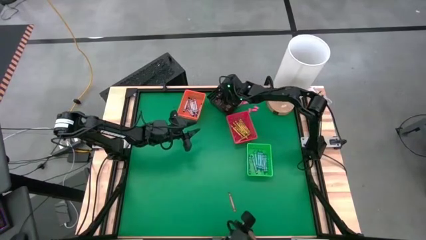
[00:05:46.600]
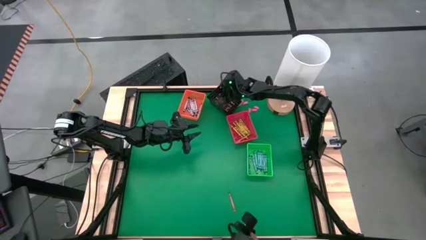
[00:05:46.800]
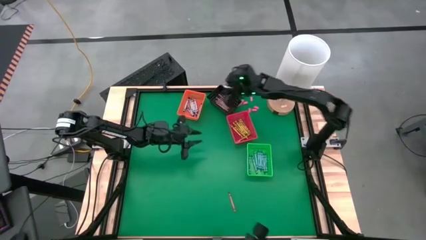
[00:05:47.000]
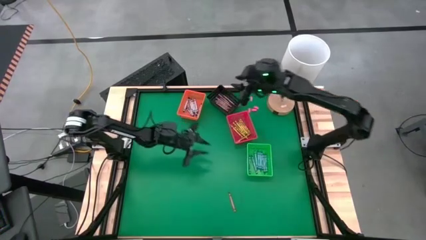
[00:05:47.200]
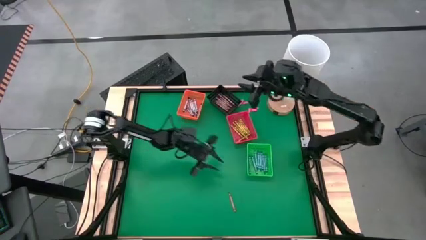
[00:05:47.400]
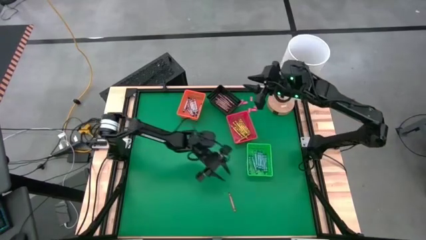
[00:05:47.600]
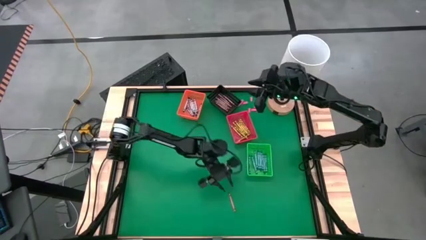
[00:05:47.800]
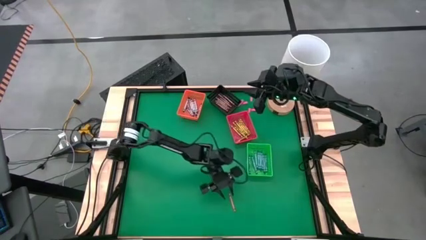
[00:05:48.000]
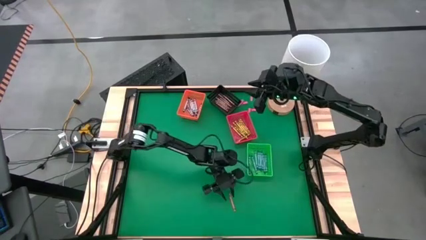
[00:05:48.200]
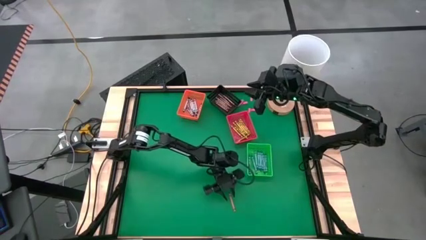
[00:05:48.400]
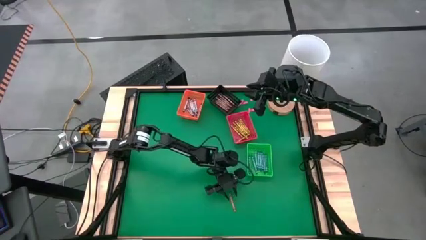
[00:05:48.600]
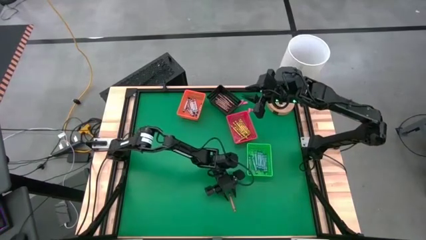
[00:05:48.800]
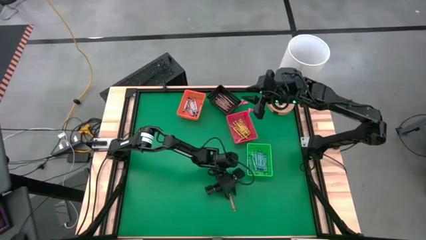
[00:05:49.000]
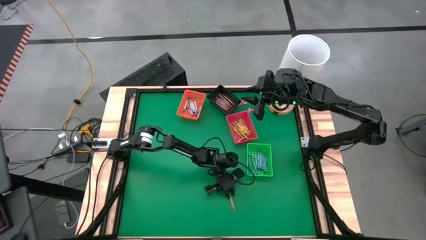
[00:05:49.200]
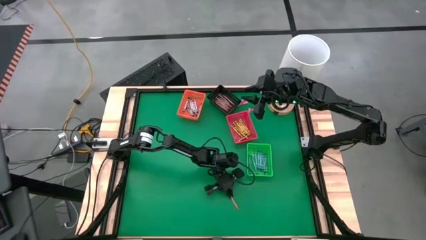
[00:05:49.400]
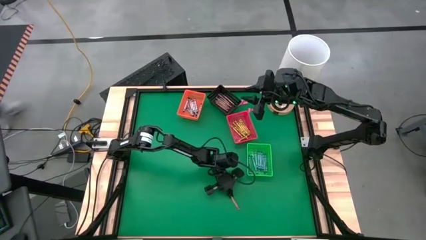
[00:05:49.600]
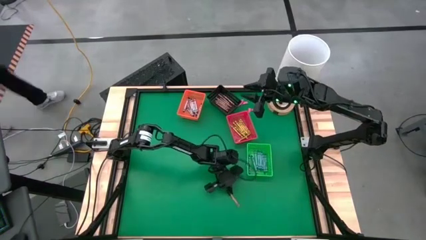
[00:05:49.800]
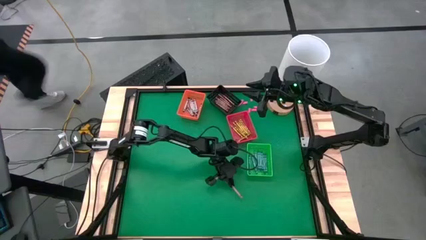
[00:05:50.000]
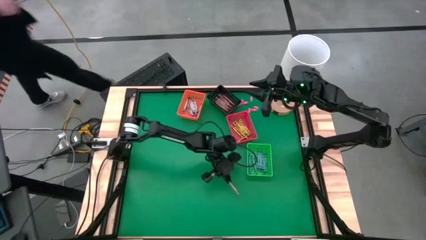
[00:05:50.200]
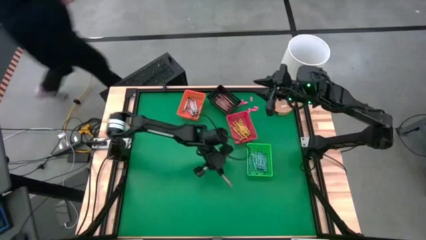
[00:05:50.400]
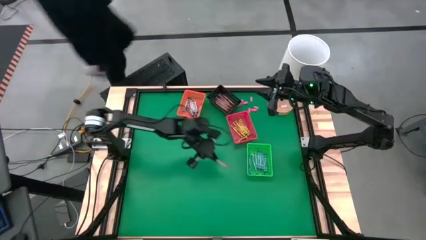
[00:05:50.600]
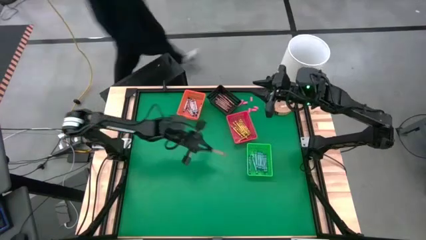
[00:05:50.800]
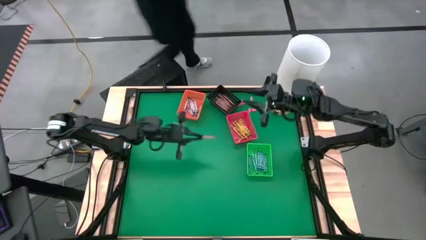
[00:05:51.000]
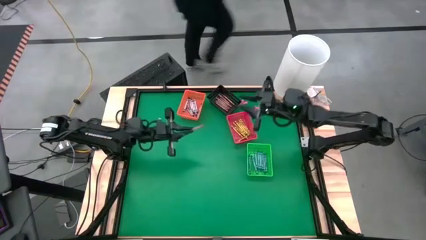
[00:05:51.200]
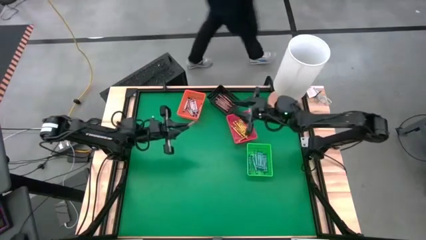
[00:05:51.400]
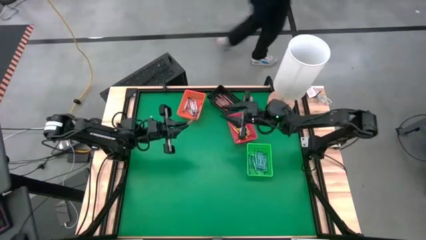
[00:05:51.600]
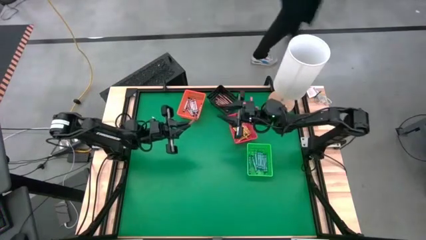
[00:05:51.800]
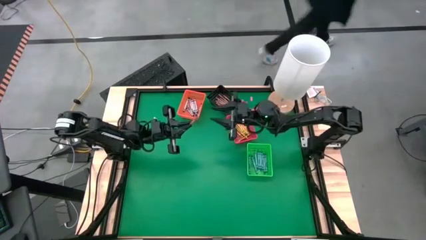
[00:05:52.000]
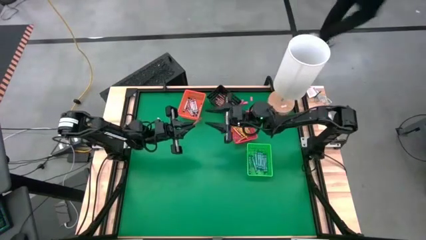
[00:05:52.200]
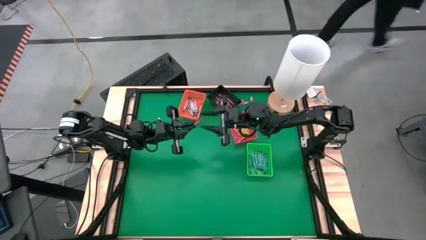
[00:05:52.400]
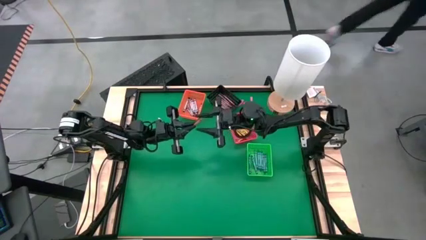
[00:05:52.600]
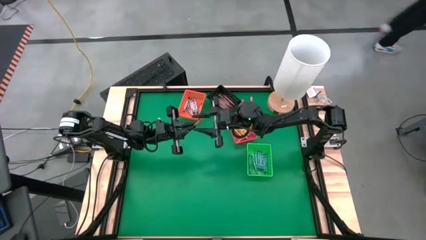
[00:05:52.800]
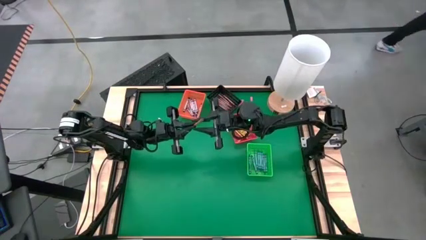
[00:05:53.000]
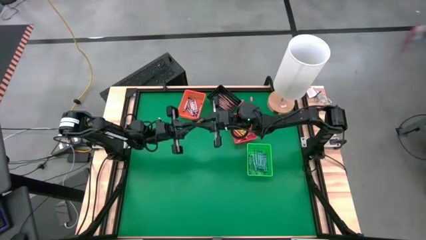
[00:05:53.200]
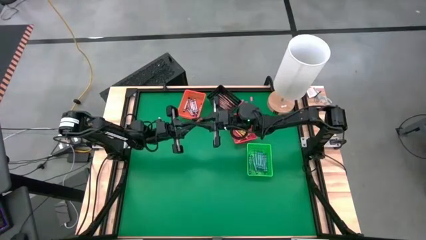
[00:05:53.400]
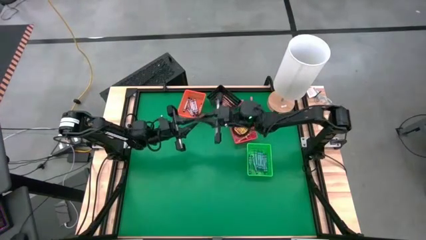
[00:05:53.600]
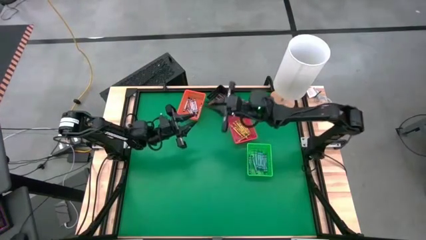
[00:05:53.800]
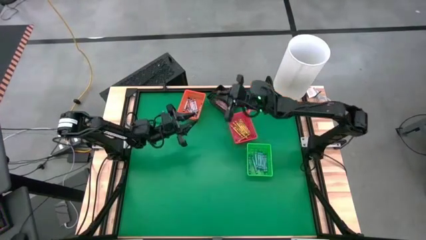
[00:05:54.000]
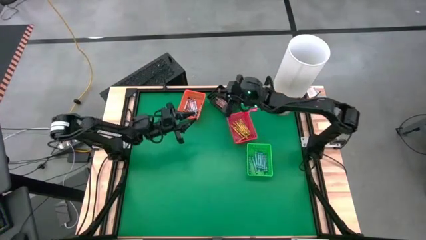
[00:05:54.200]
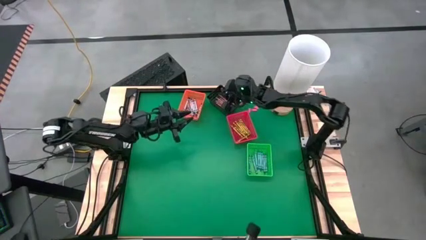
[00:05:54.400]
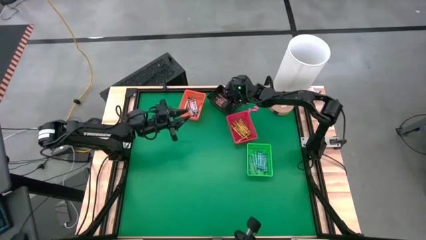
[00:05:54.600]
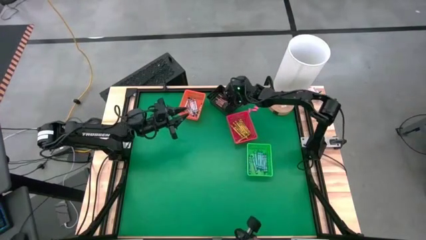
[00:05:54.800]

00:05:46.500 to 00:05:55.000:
Task: Sort crayons
Put the brown crayon into the black bin

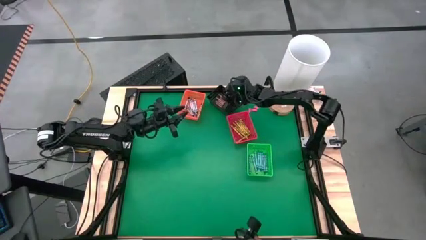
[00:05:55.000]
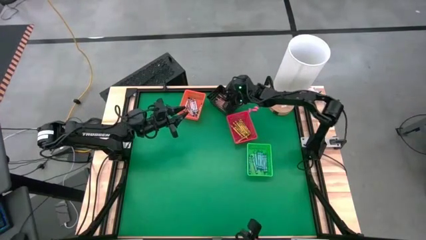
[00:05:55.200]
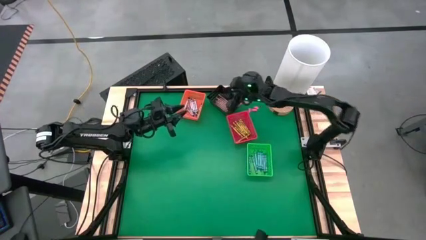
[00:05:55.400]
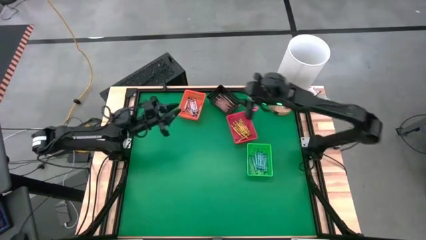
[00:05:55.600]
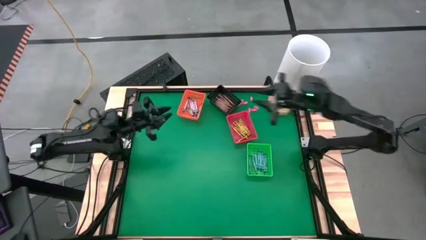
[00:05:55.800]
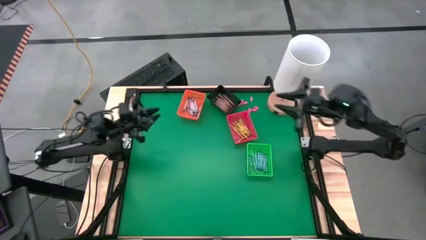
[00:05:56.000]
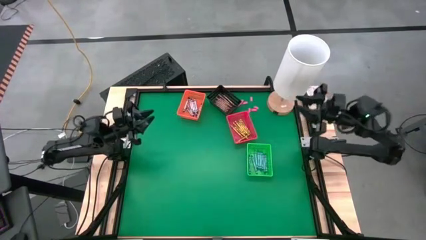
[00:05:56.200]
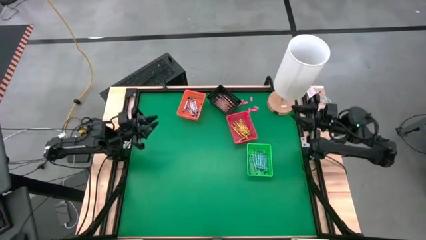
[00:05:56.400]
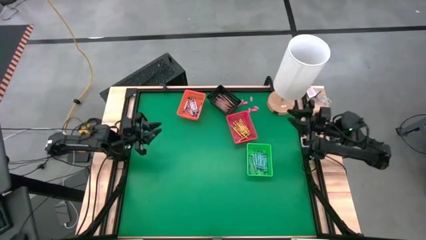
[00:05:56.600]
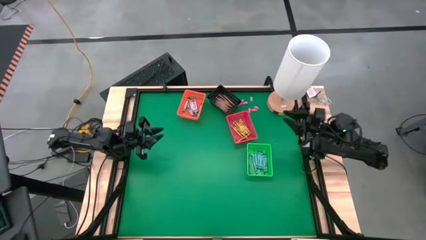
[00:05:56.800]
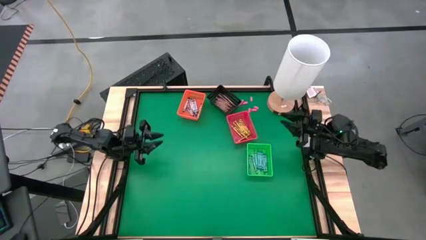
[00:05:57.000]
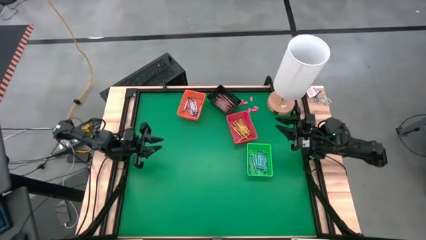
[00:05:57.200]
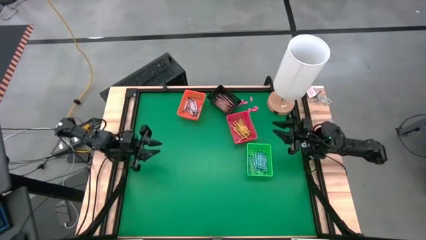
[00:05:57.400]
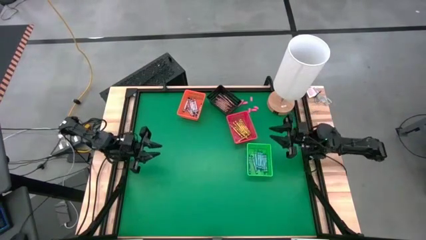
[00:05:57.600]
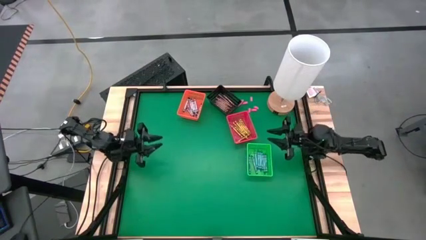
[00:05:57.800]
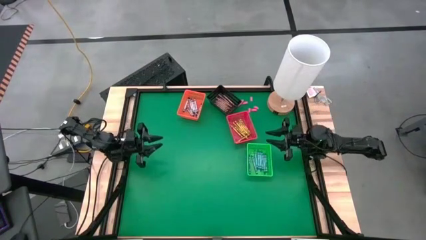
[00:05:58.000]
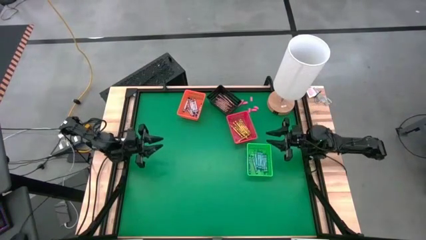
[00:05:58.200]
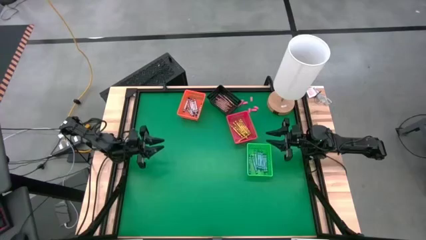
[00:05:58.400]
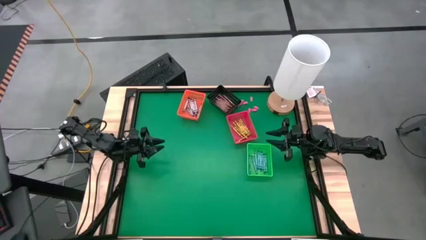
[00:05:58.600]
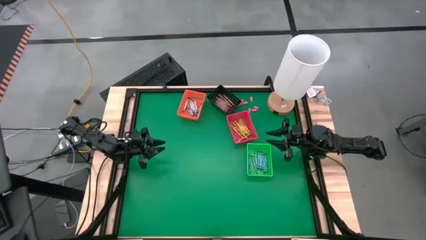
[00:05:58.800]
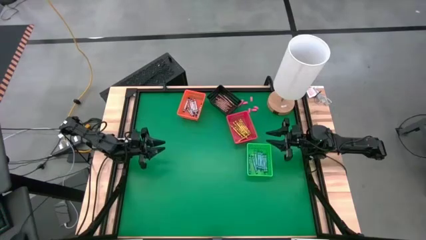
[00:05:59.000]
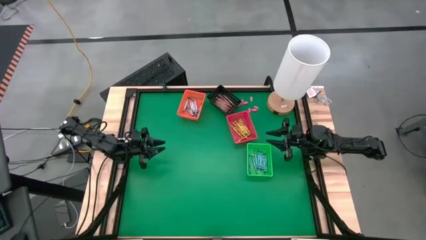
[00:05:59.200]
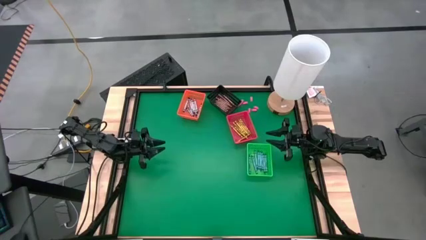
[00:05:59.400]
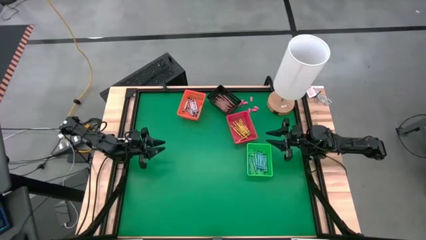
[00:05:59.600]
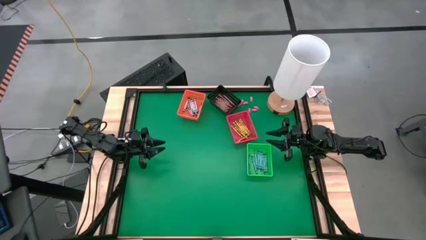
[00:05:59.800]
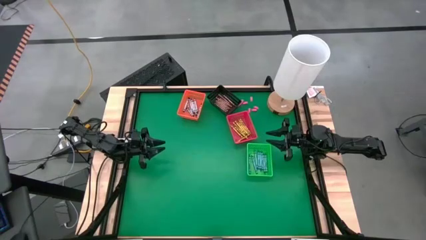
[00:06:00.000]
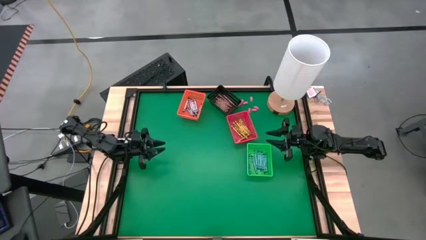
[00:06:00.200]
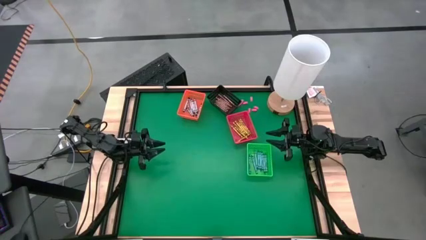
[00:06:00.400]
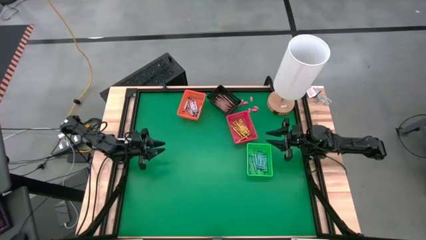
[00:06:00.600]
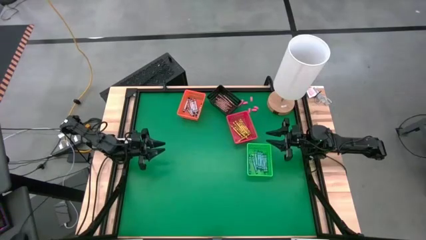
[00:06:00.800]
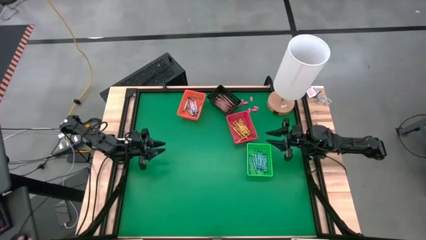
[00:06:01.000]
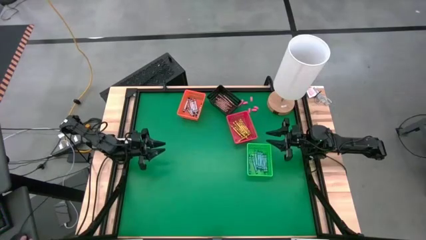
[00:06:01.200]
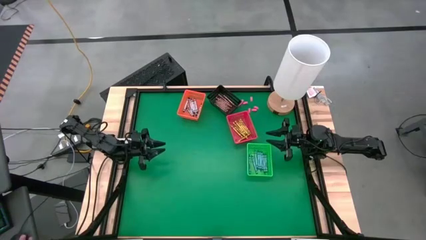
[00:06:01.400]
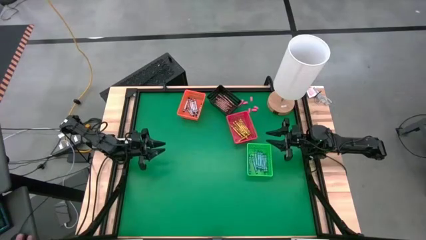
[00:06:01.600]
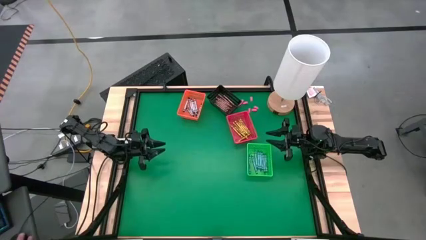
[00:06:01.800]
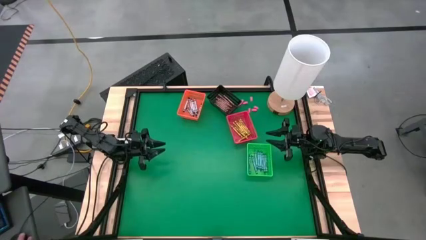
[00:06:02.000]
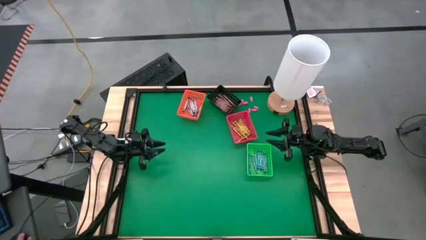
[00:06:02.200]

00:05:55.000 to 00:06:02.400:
Return to Home Position
